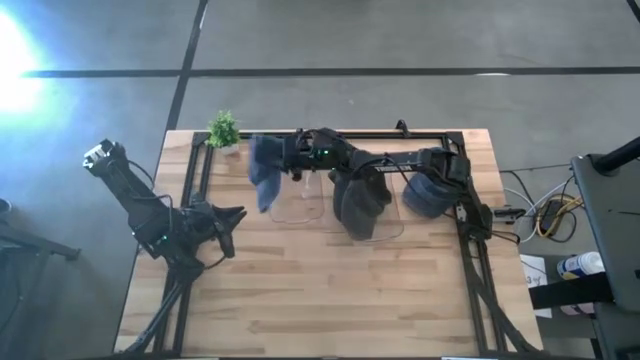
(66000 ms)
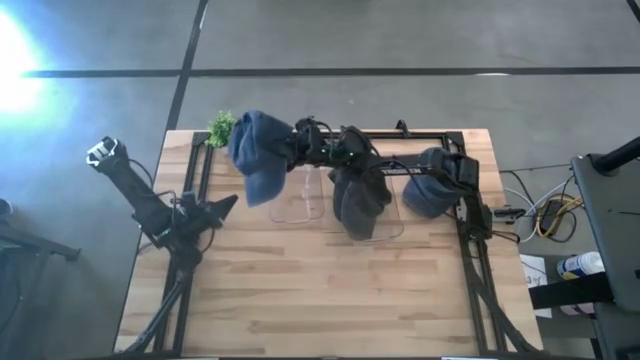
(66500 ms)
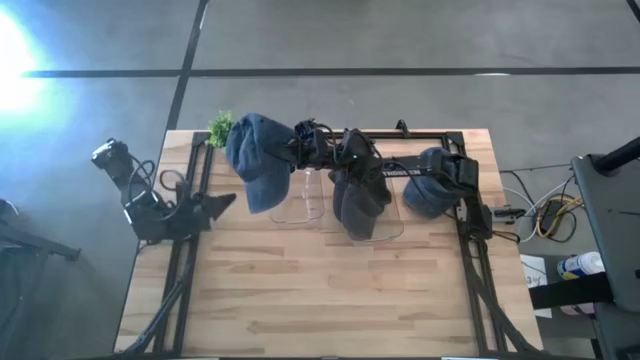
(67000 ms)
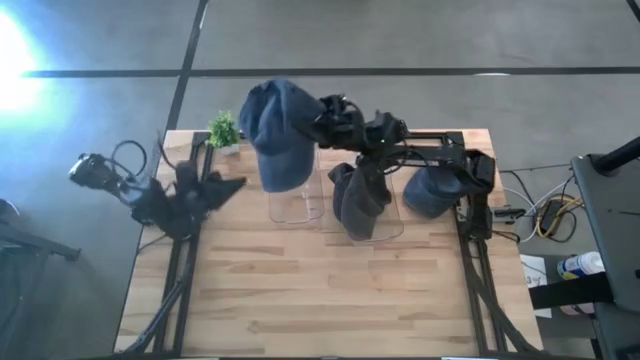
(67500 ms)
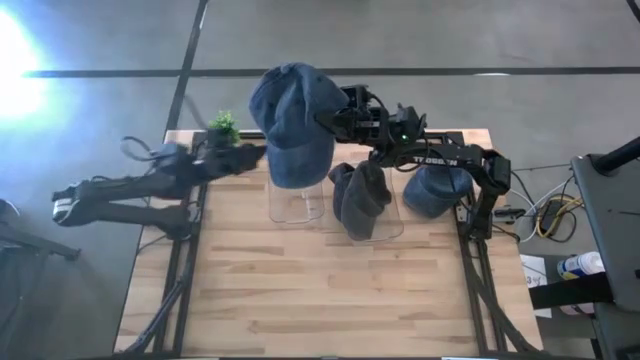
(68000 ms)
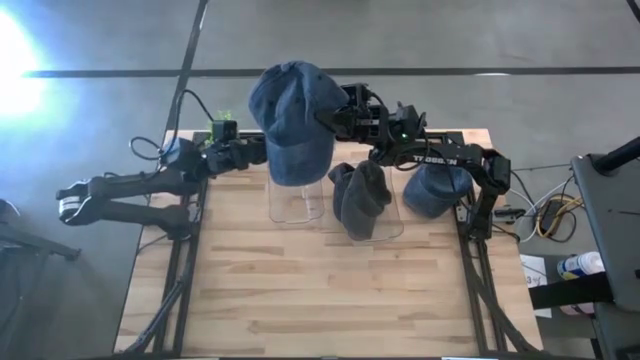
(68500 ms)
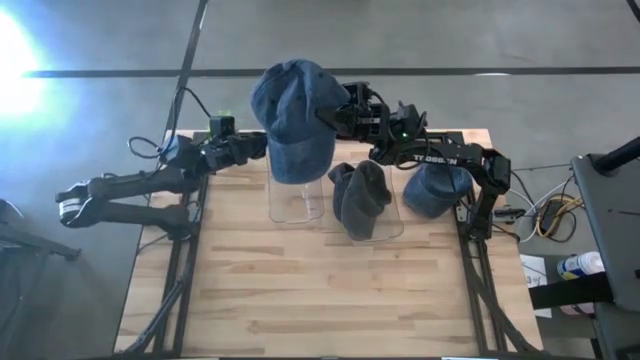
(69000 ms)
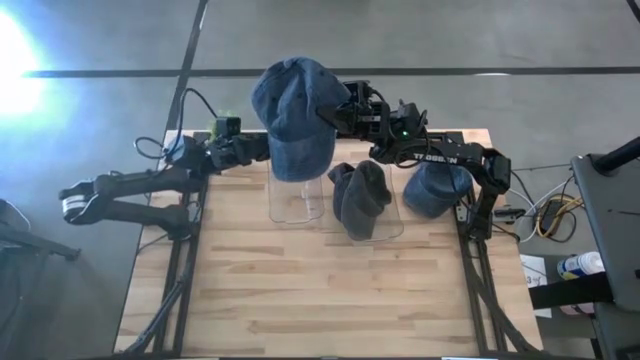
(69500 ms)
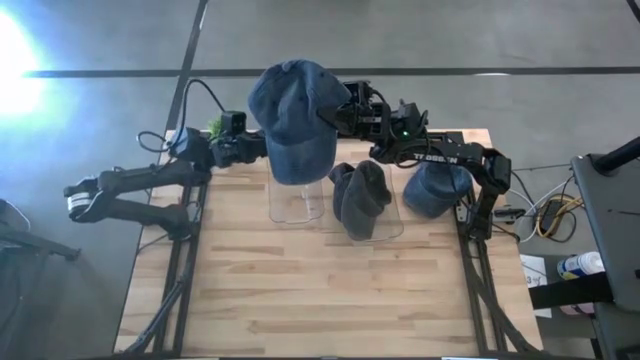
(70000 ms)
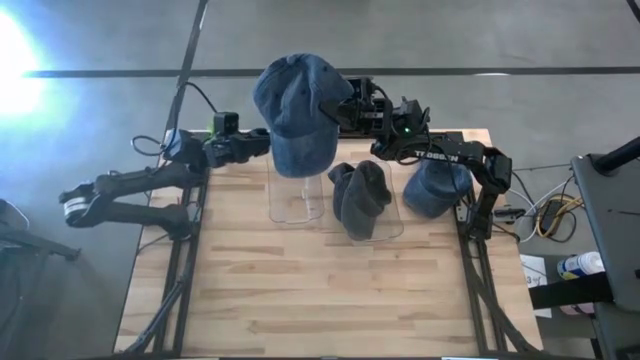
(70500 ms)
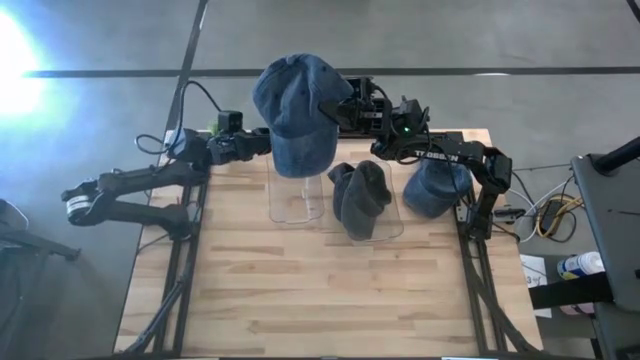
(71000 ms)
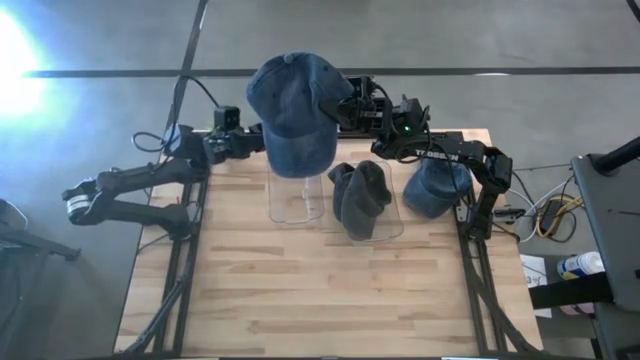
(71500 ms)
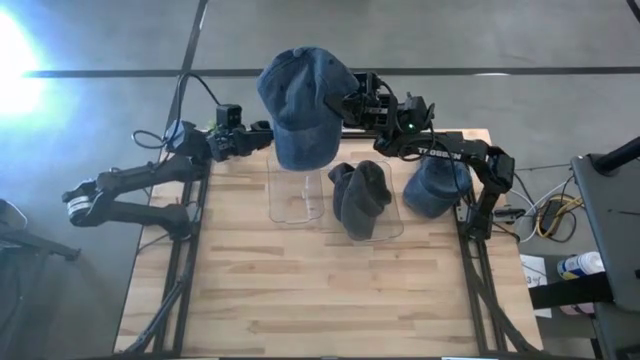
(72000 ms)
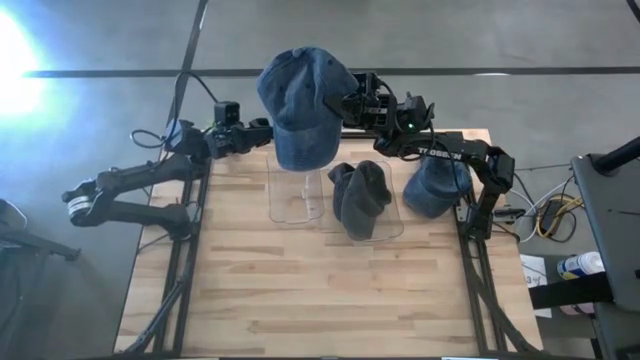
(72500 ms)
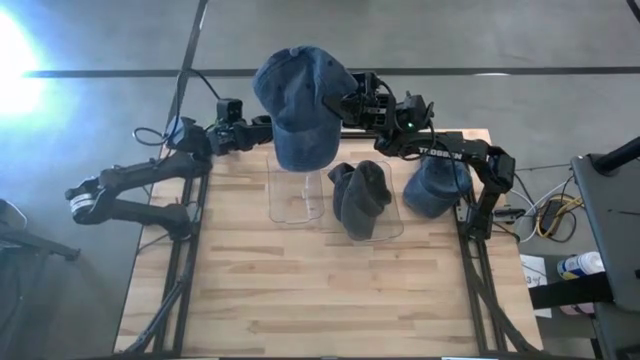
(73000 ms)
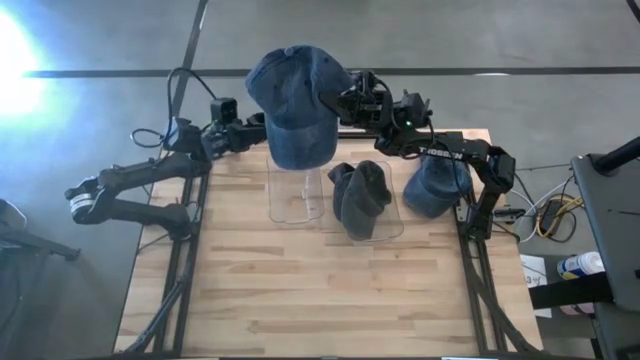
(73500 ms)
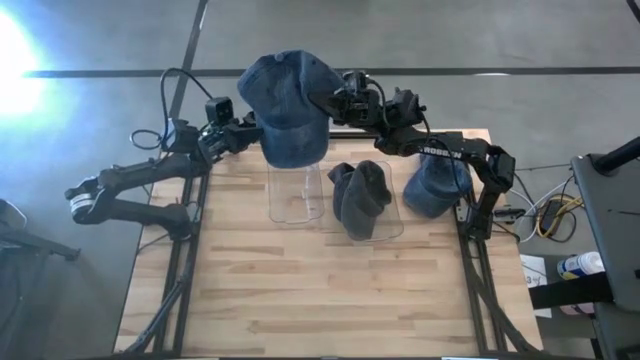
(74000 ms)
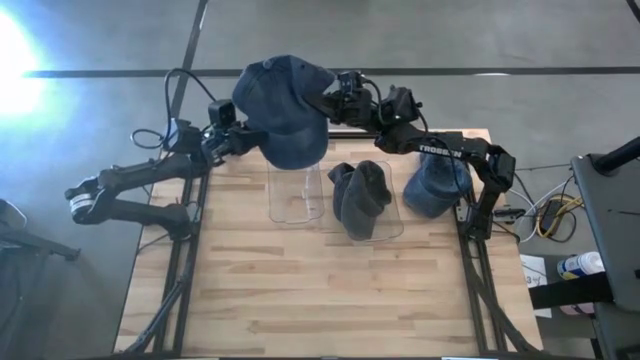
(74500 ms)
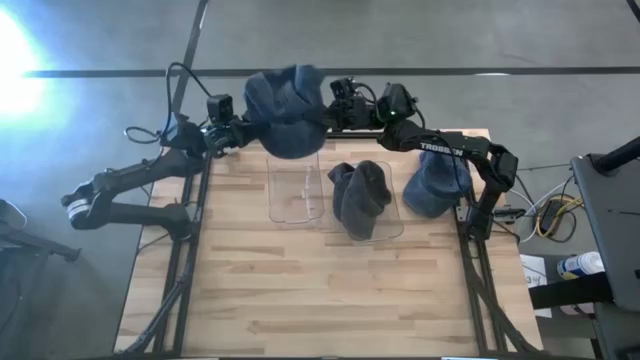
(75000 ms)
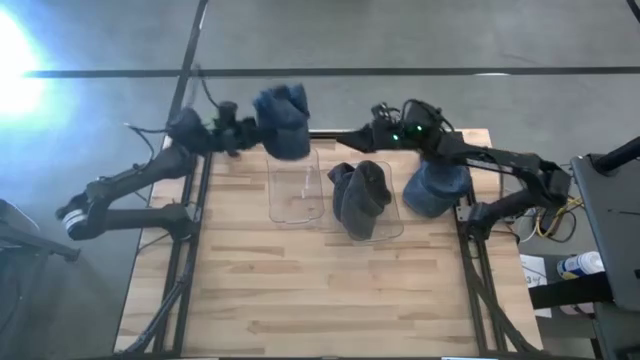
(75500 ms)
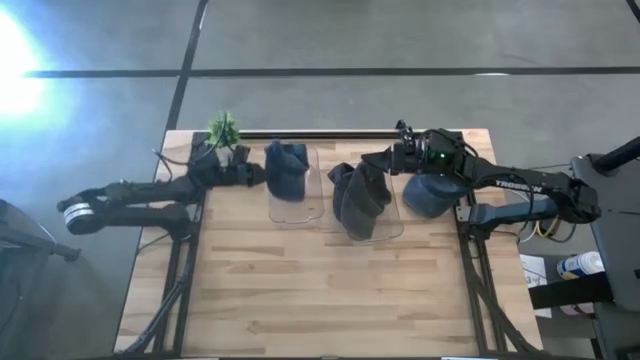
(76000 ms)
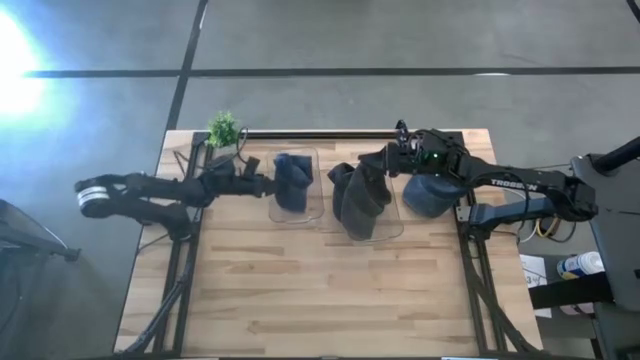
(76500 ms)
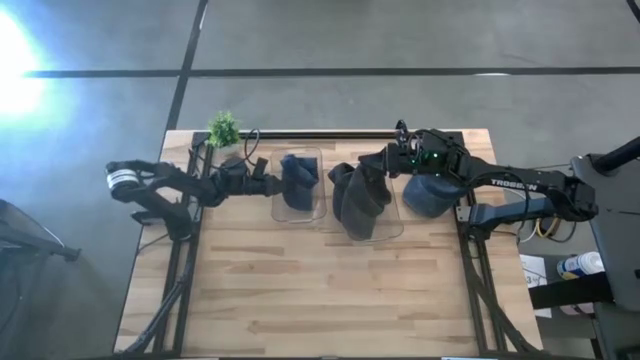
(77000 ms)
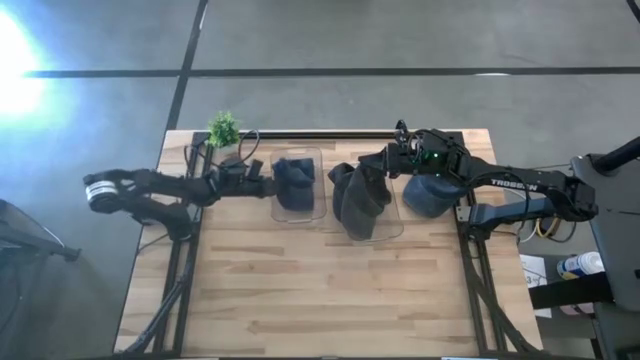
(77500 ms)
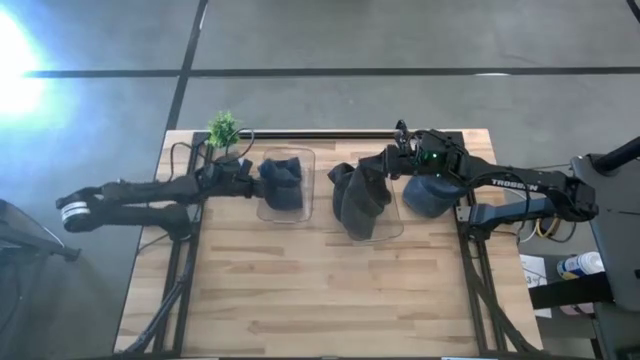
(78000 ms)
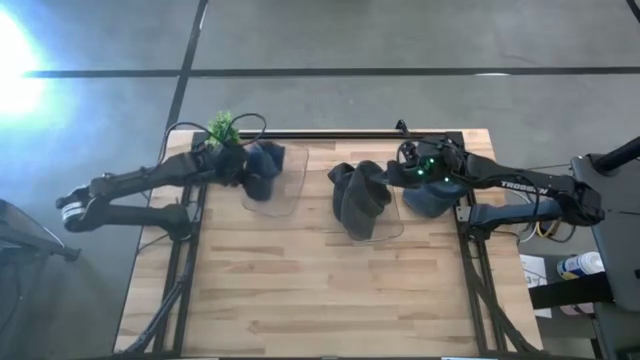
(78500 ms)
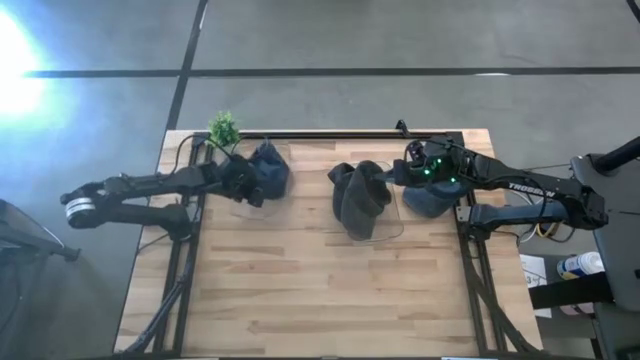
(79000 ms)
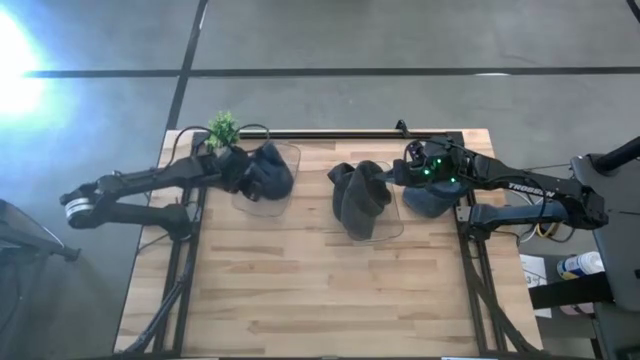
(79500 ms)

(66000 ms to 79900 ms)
Task: Pick & Place hat
Put the bottom blue cap into the left transparent bin

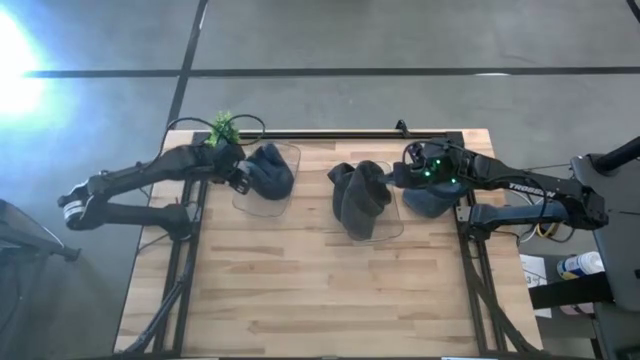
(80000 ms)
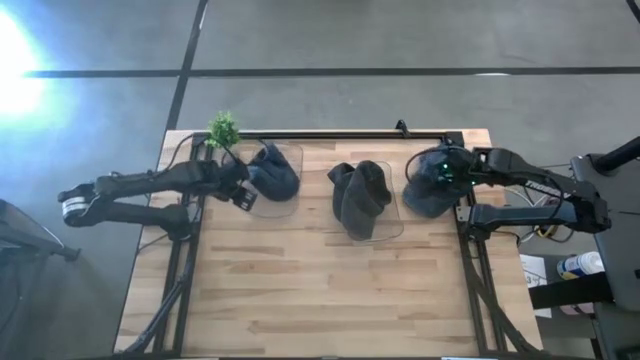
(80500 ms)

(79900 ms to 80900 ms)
Adjust the left transparent bin

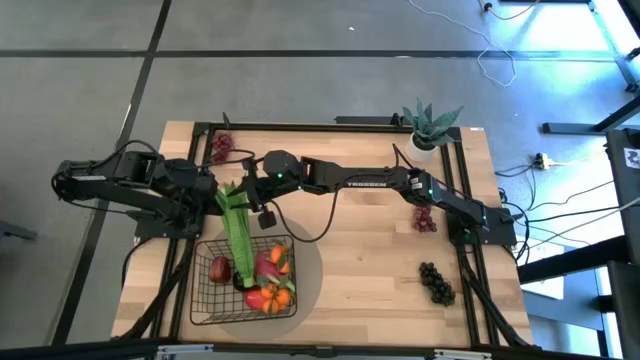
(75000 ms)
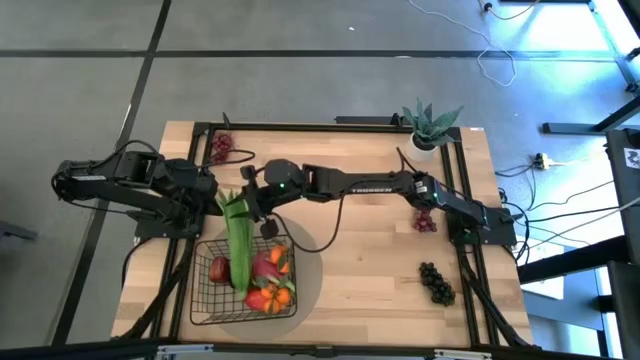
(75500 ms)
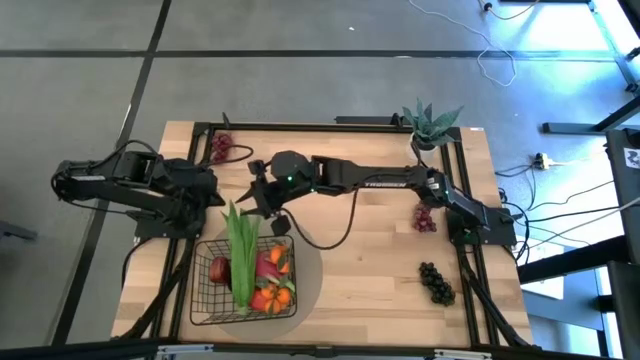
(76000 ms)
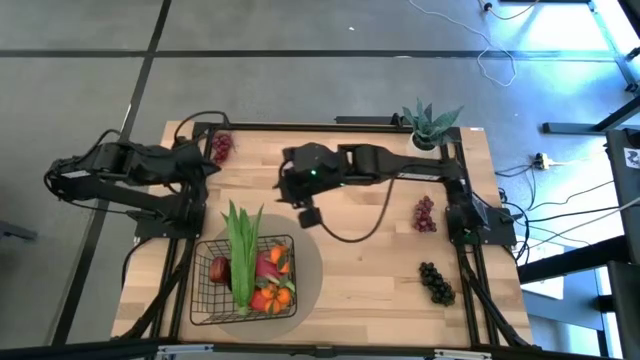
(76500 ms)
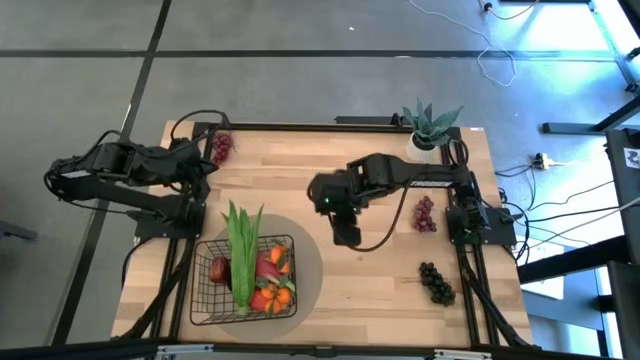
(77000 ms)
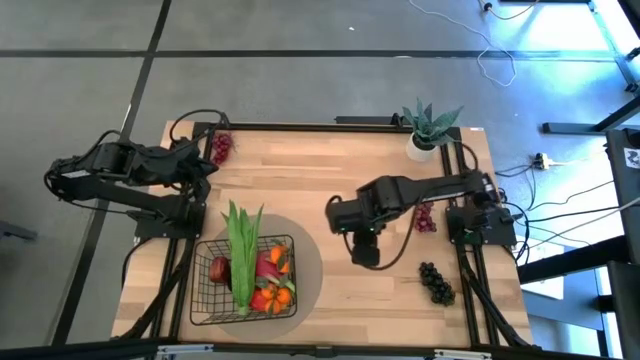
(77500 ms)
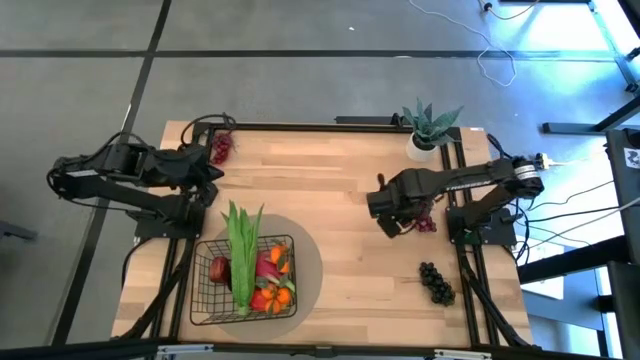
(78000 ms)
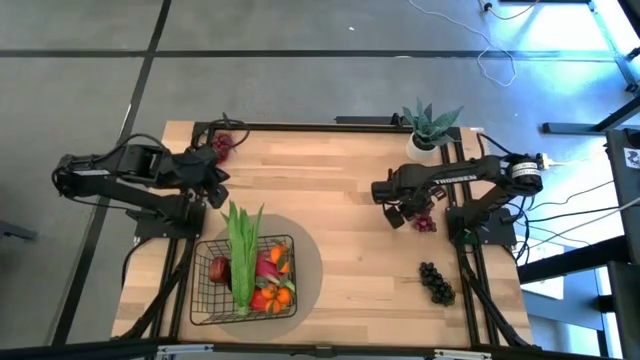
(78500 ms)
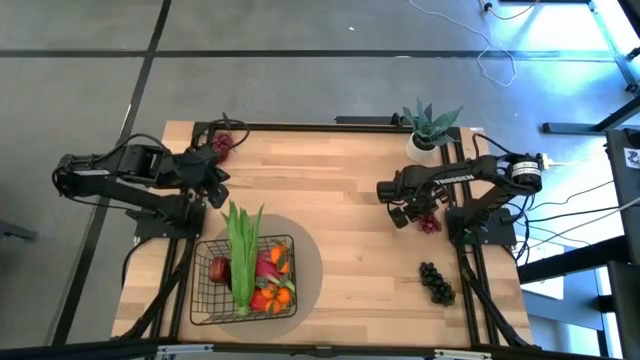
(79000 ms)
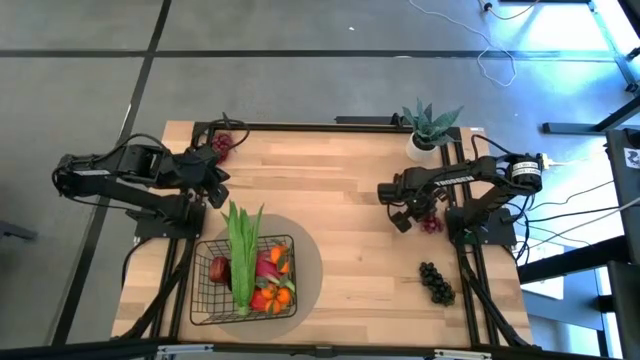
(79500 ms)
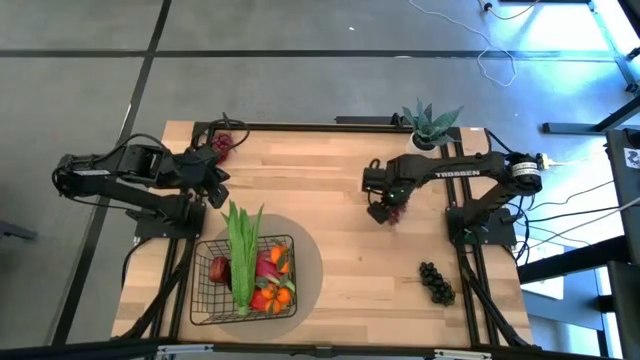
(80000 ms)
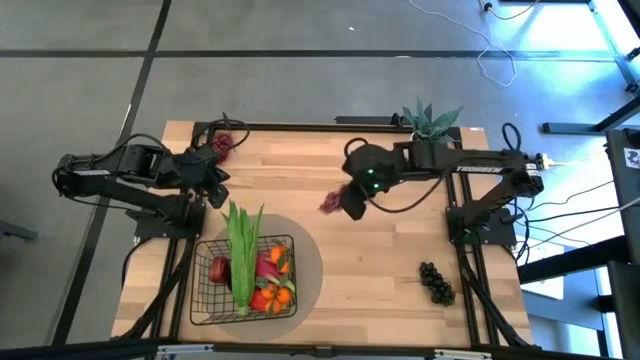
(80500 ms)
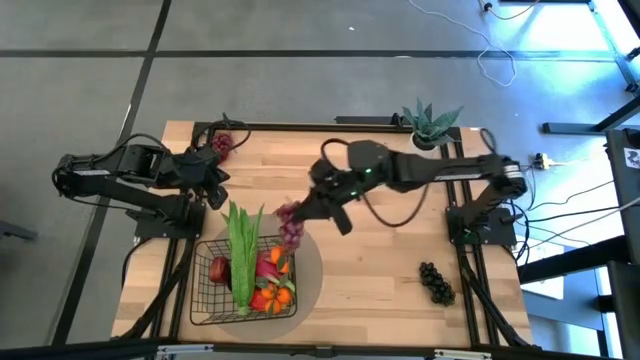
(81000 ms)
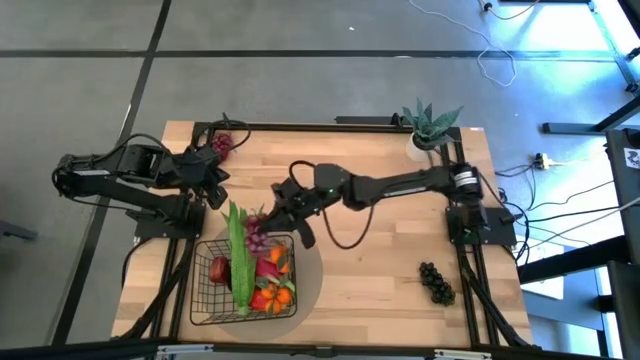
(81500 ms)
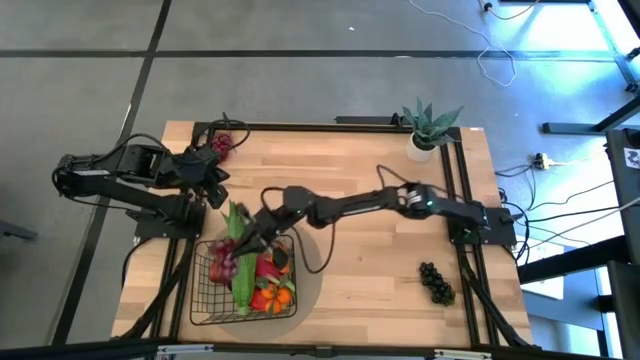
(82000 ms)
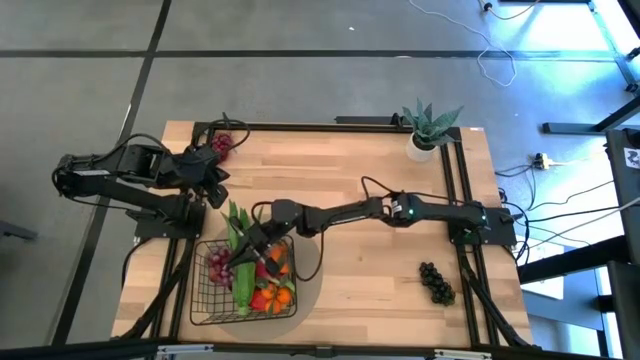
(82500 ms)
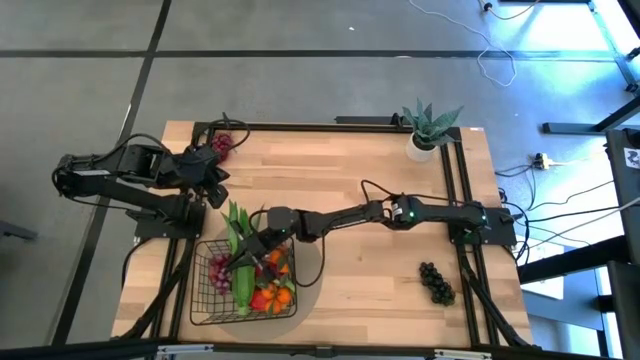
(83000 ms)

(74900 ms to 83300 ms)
Task: Build produce basket
Put the right violet grapes into the black wire basket
